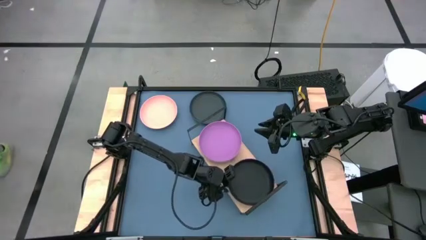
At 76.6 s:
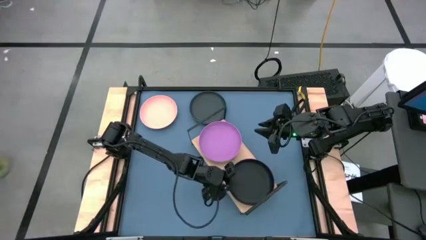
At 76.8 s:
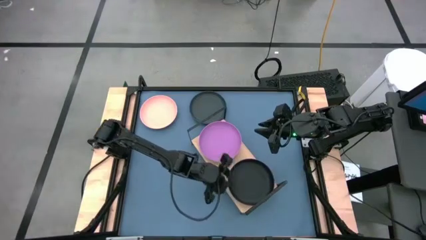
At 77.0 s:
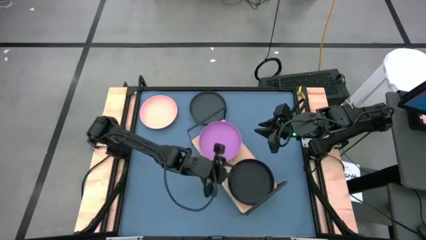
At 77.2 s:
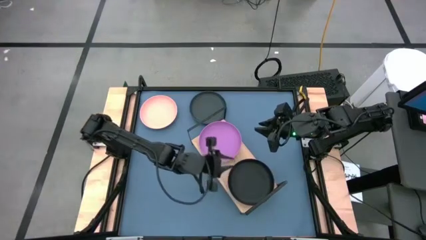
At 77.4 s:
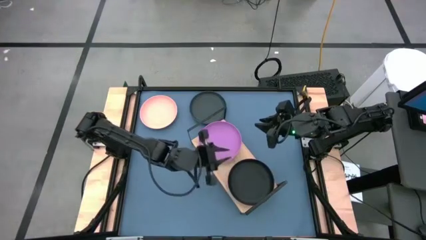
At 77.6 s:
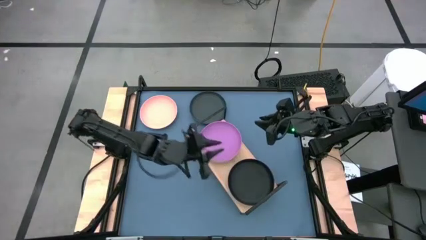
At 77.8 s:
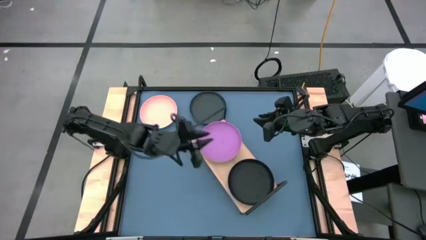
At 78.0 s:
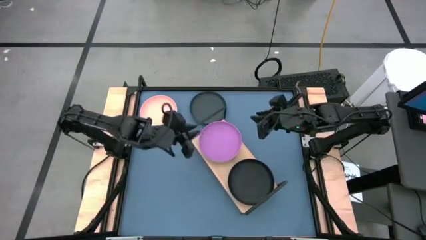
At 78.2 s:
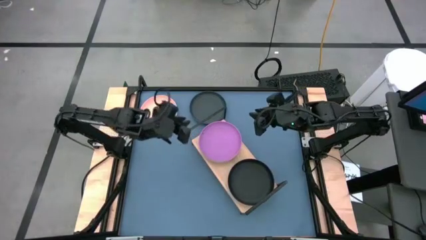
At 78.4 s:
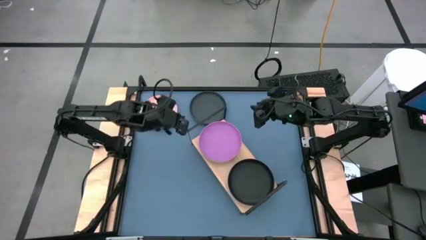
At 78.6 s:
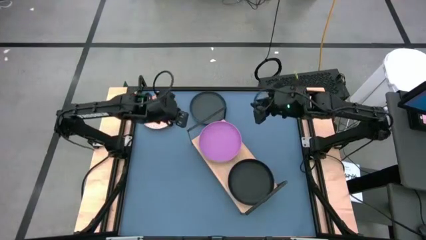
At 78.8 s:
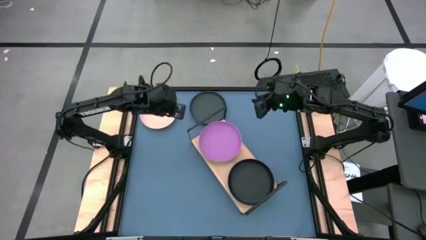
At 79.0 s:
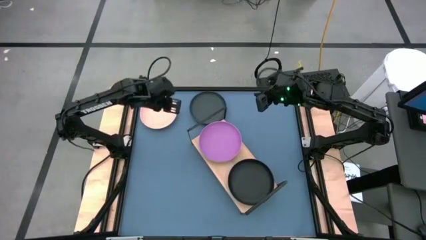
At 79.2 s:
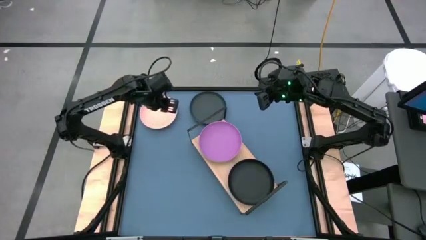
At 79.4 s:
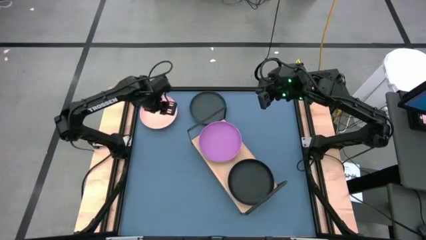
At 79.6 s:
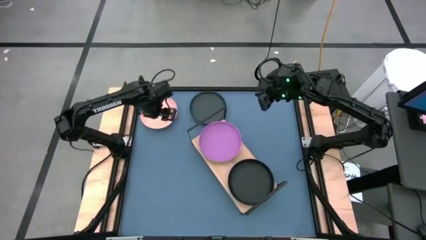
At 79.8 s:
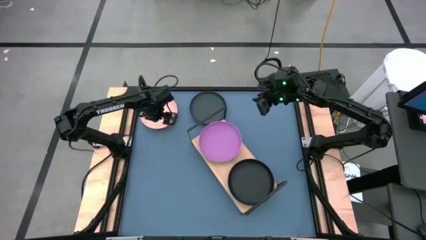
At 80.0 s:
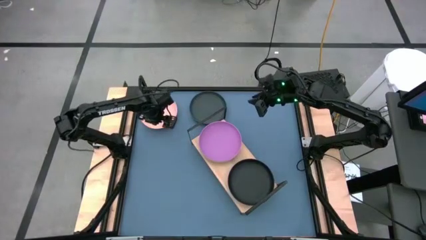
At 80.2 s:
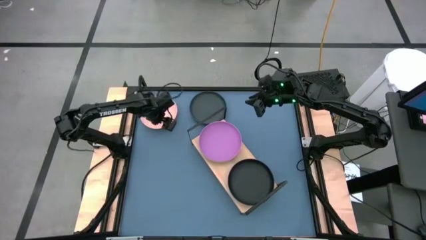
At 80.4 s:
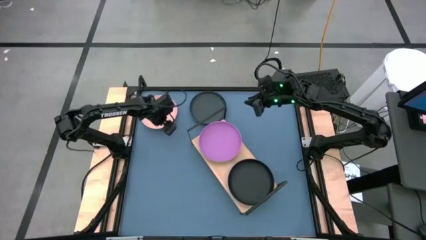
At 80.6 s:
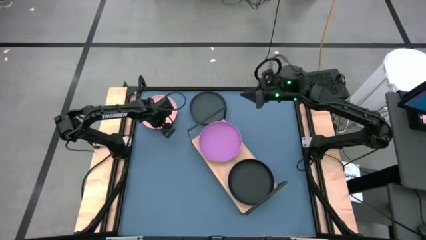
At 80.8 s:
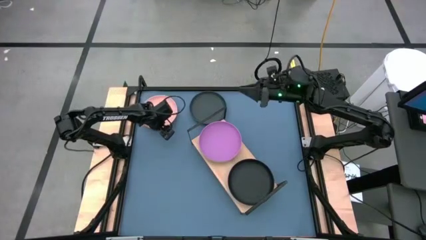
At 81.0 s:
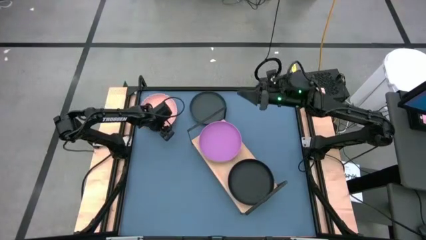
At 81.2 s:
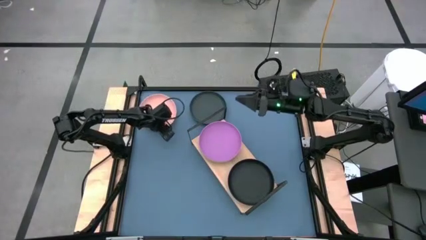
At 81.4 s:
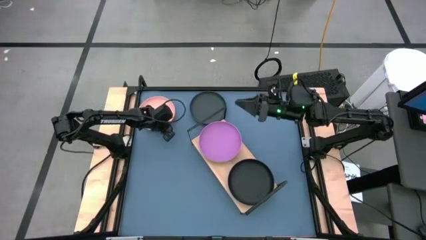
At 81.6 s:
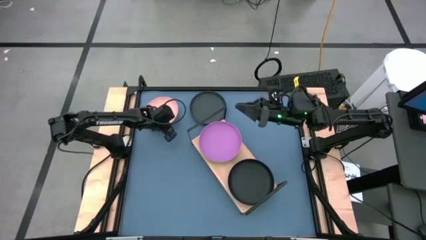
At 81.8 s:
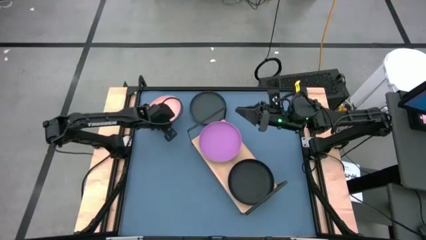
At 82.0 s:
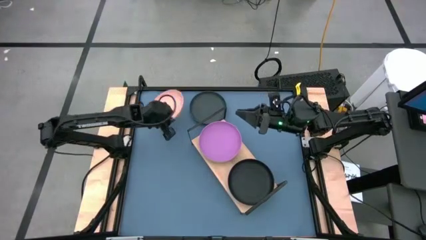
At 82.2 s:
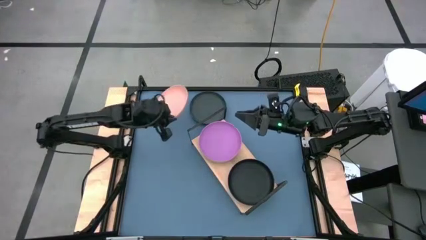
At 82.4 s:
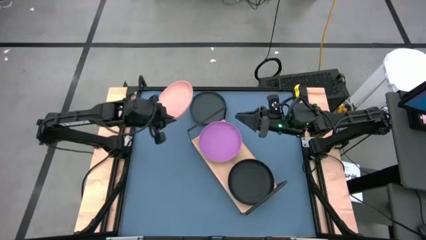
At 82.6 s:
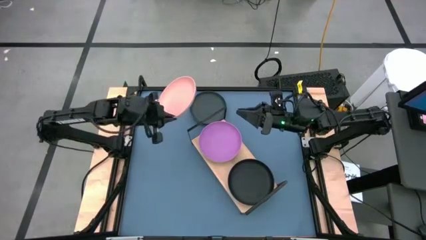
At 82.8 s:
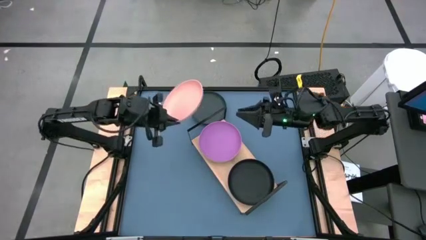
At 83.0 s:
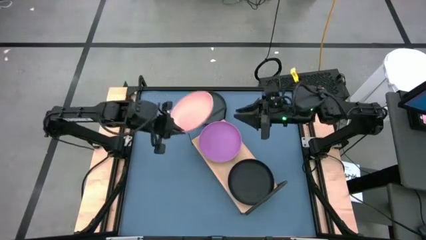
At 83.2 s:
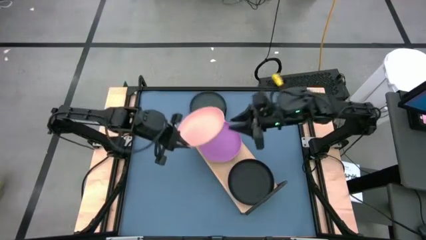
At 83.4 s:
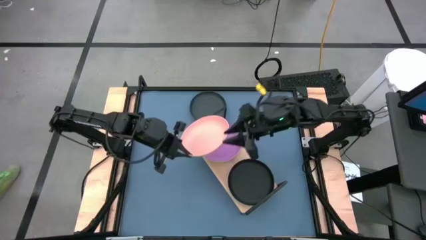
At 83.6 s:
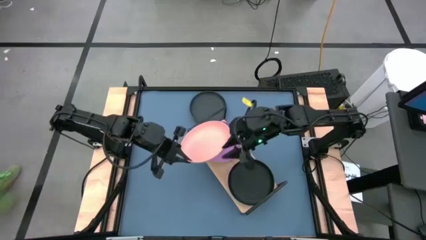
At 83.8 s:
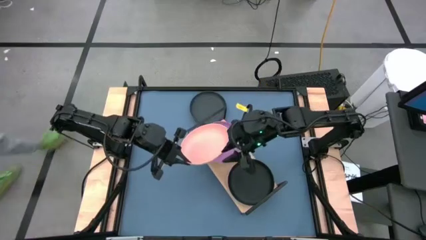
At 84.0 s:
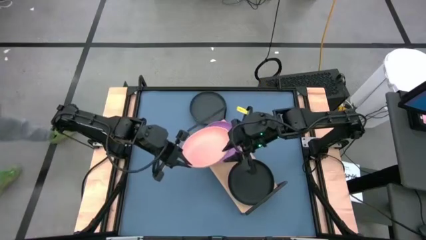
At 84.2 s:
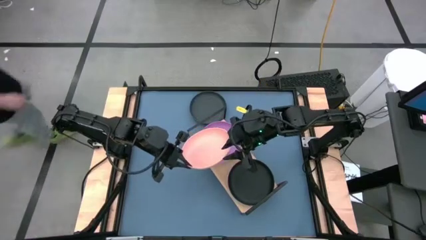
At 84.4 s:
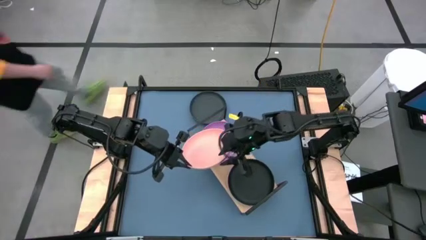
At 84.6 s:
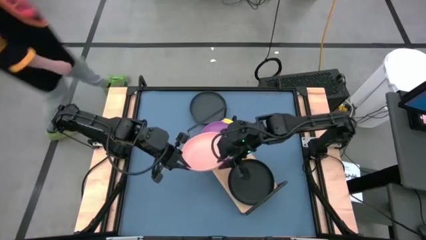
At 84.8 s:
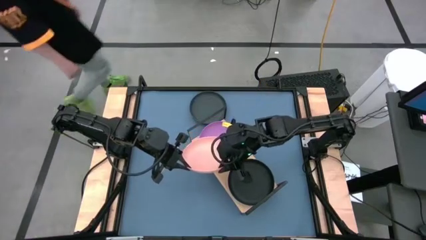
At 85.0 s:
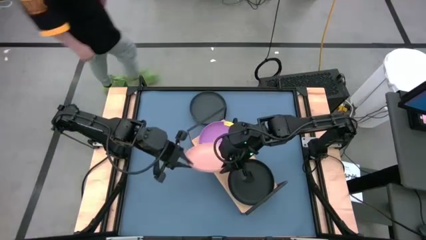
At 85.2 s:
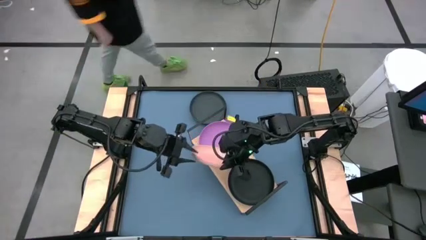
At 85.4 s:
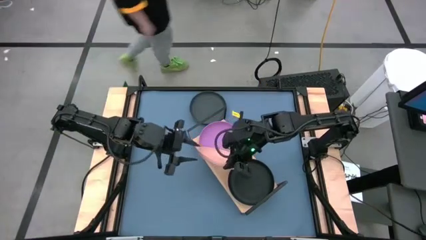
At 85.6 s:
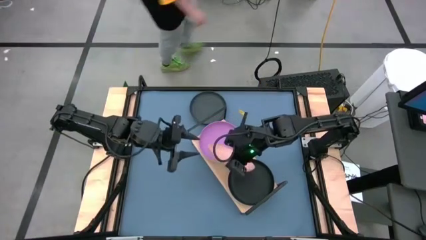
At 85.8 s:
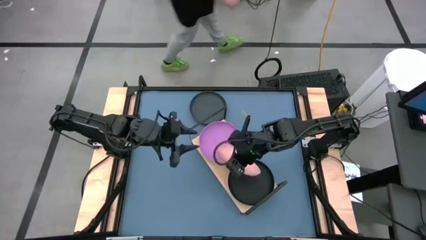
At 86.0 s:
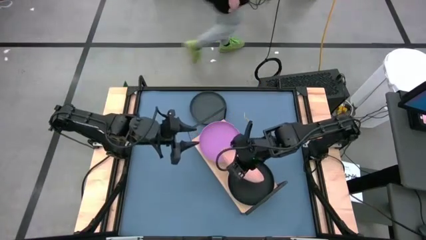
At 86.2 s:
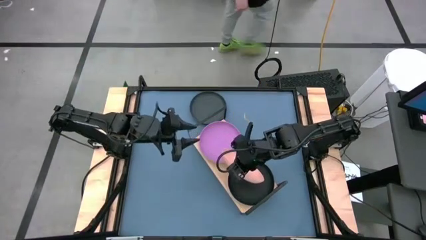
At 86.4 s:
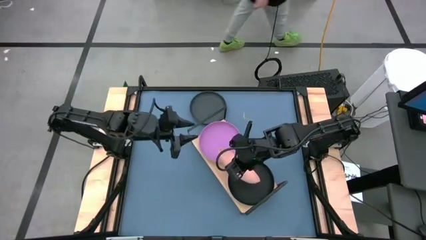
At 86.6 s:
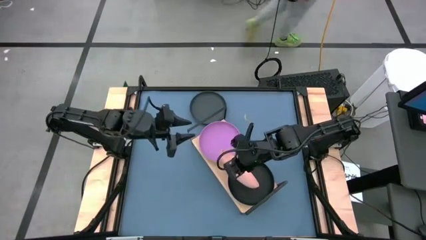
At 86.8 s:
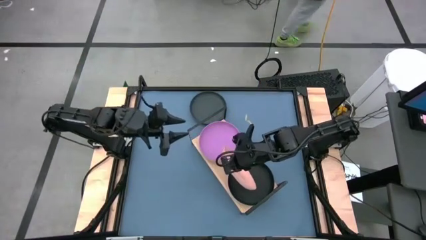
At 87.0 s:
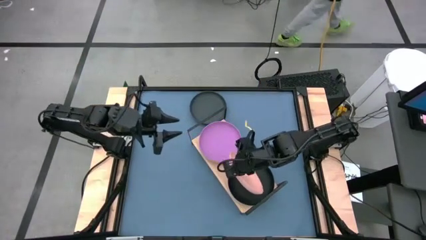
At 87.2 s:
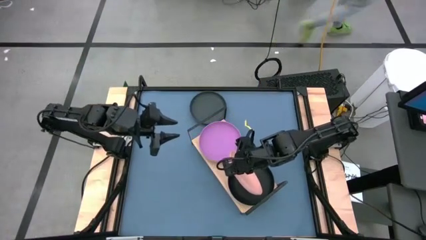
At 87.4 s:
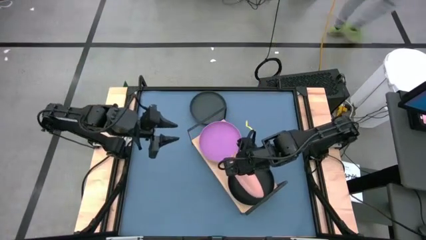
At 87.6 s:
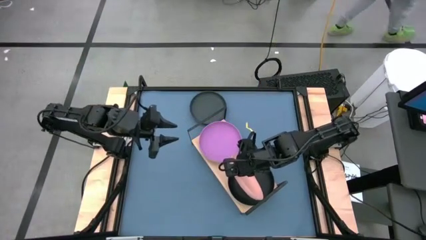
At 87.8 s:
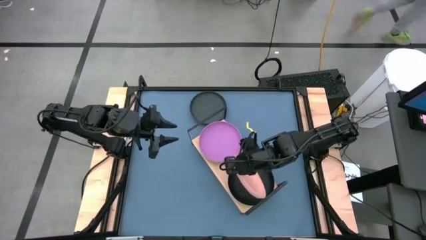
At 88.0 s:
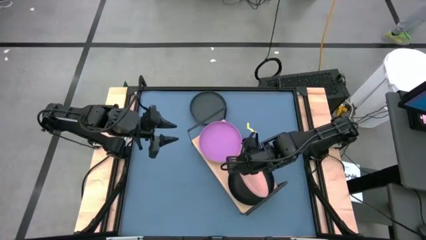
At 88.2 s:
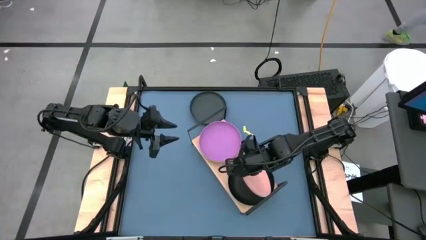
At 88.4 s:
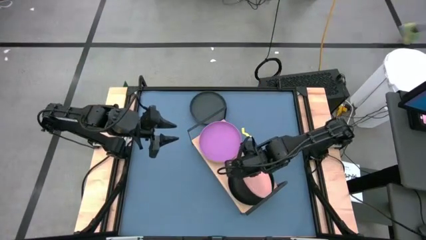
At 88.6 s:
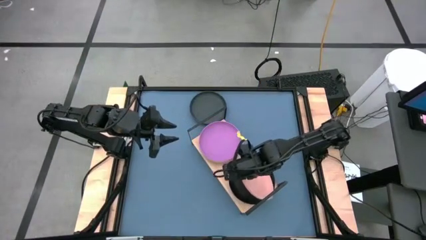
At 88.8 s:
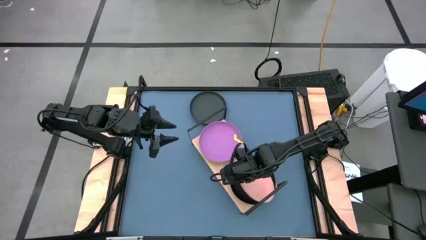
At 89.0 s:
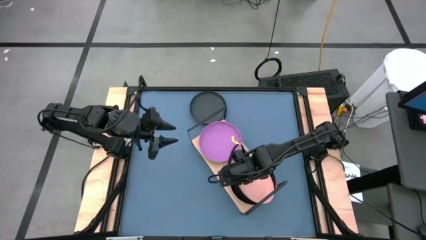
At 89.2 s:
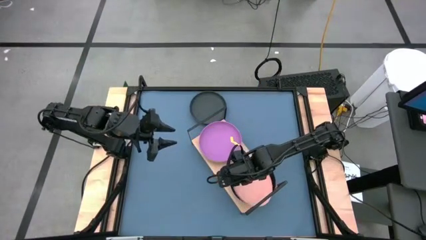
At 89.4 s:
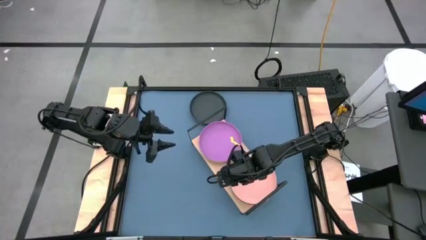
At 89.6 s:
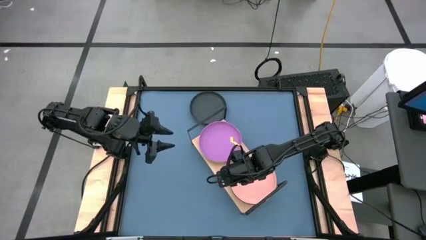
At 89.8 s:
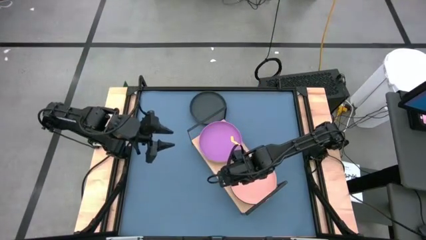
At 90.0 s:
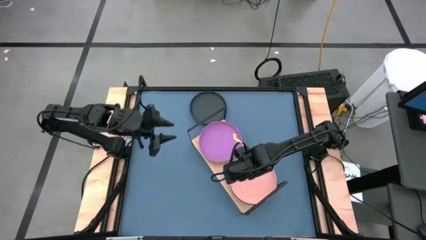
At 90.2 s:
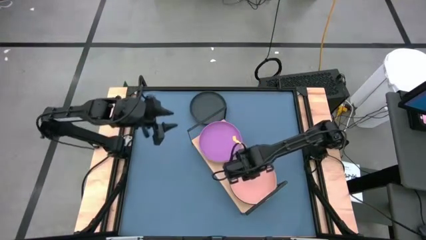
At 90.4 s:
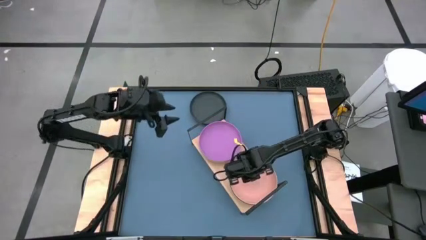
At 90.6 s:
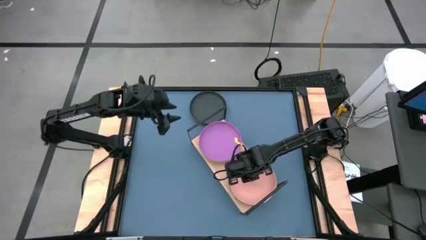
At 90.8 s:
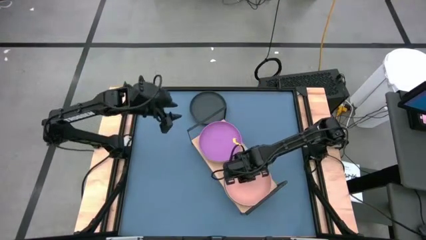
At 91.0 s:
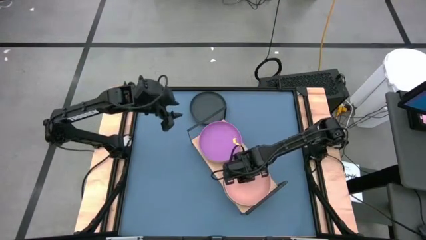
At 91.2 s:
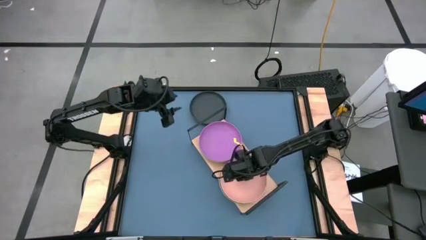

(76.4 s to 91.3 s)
Task: Place and stack plates onto a shelf
Stack the light orange plate on top of the black plate on the shelf

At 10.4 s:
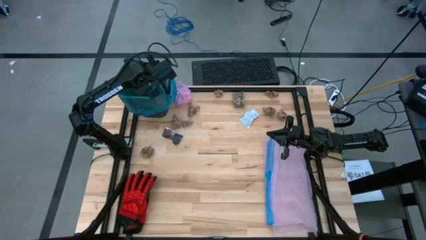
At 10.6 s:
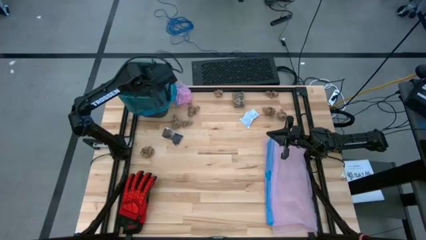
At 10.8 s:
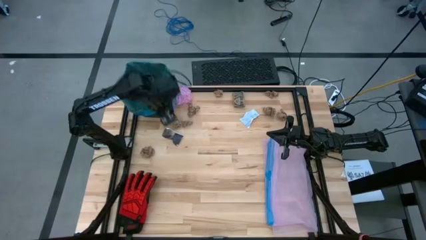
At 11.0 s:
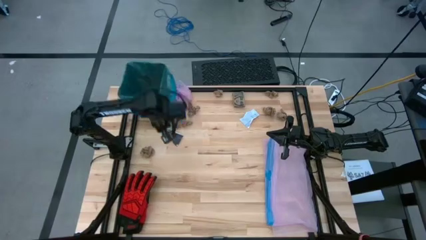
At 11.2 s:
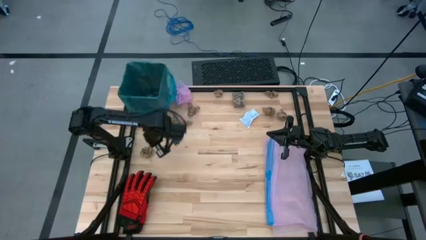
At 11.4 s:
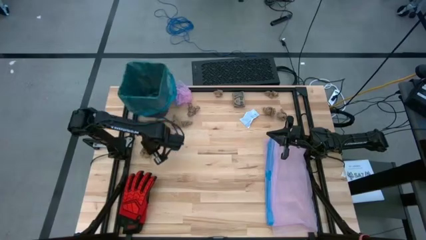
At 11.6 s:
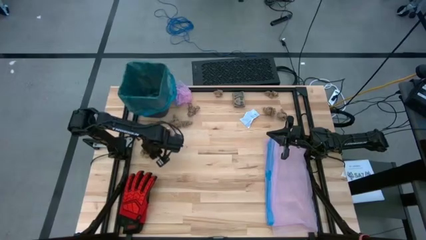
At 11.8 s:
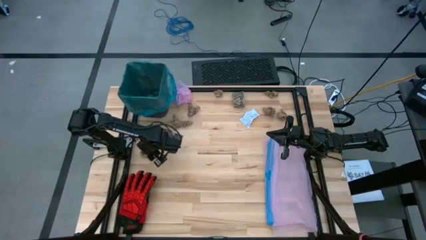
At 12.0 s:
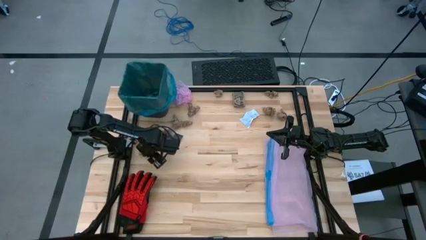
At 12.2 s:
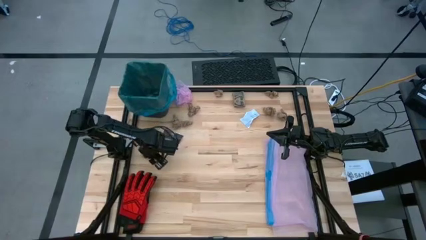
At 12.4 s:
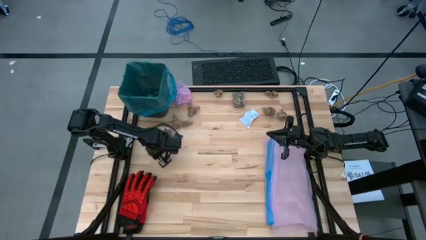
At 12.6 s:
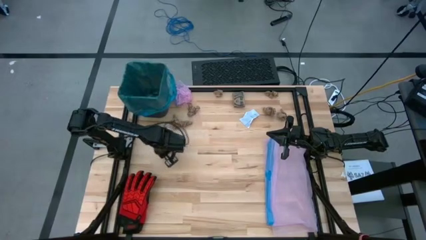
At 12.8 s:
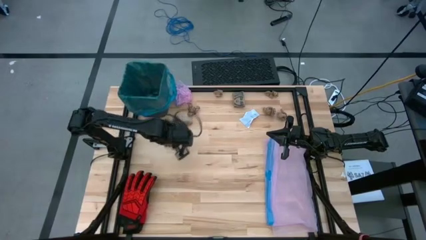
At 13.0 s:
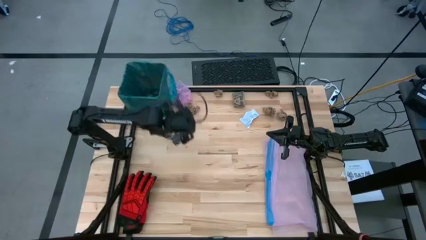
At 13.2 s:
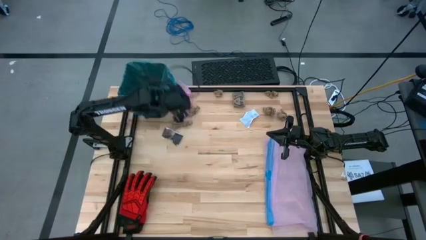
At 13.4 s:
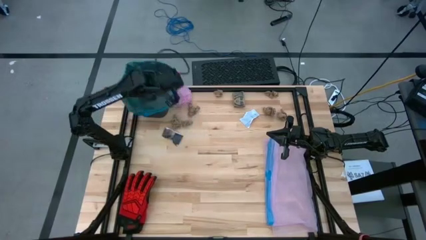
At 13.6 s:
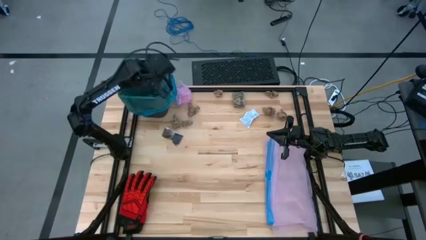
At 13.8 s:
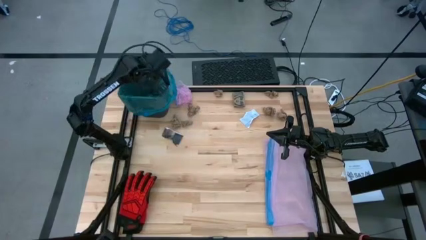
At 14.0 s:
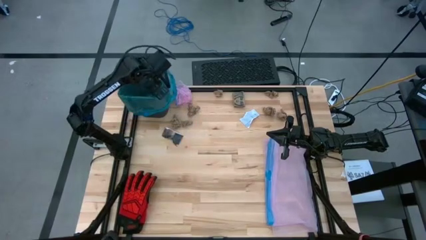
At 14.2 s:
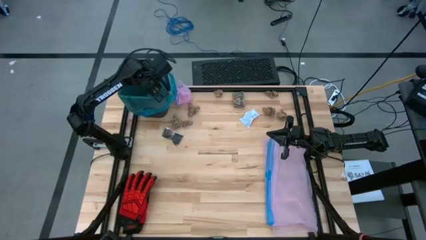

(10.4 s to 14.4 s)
Task: place trash/remove bag and relplace
Put the brown napkin in the trash bin
